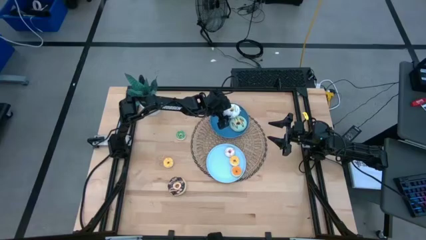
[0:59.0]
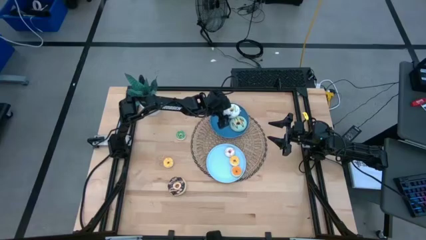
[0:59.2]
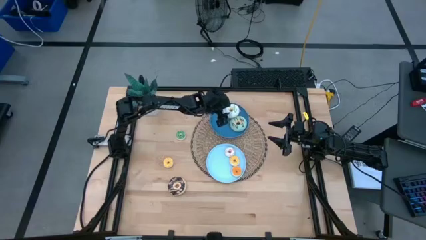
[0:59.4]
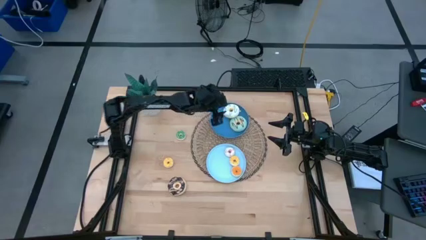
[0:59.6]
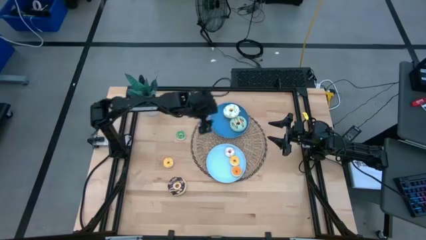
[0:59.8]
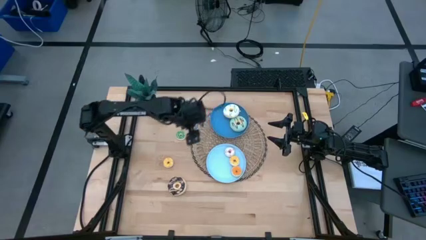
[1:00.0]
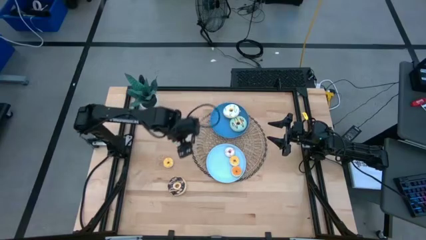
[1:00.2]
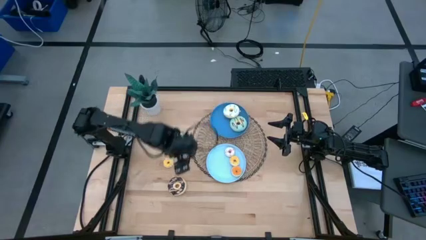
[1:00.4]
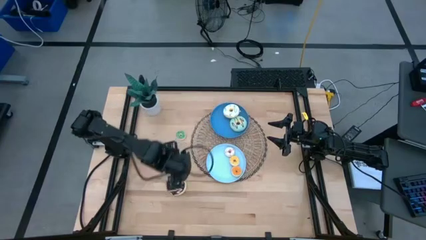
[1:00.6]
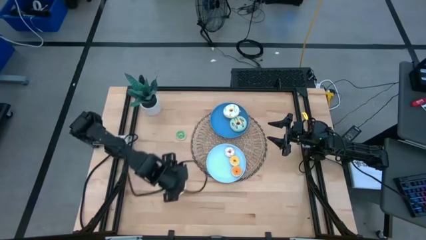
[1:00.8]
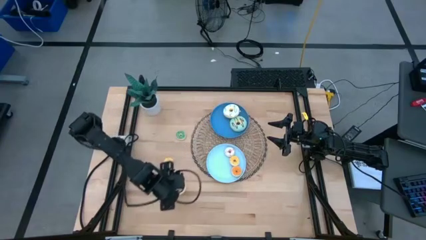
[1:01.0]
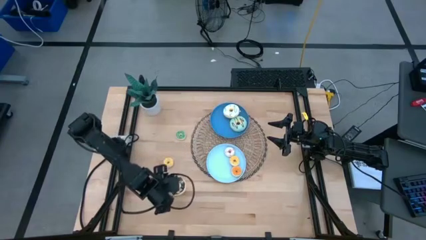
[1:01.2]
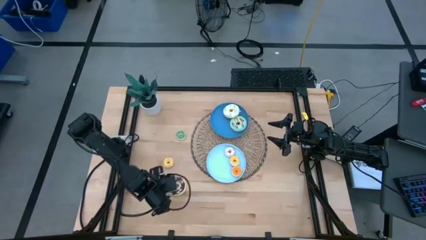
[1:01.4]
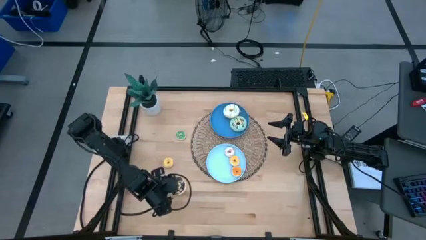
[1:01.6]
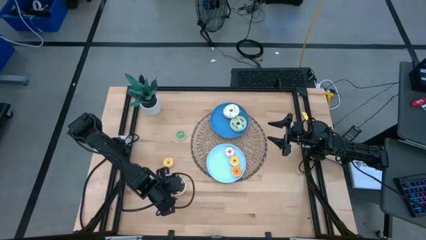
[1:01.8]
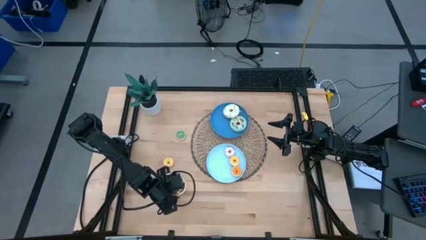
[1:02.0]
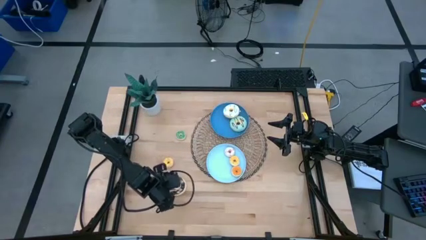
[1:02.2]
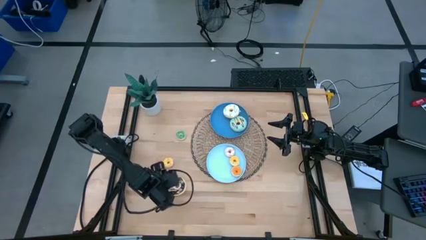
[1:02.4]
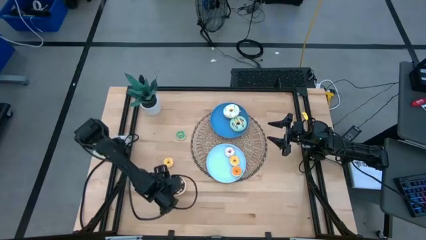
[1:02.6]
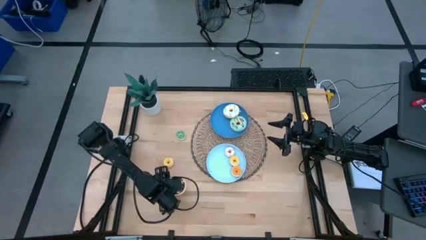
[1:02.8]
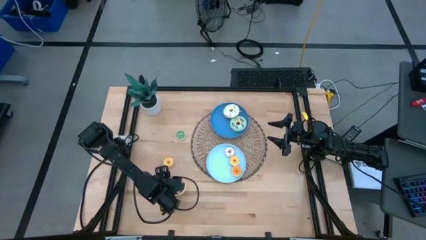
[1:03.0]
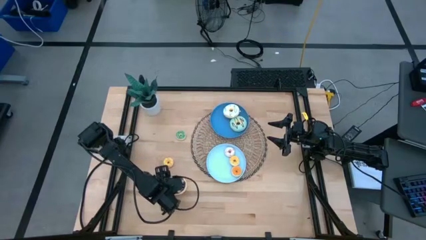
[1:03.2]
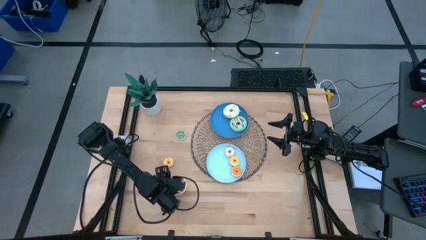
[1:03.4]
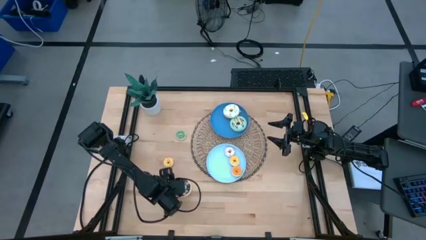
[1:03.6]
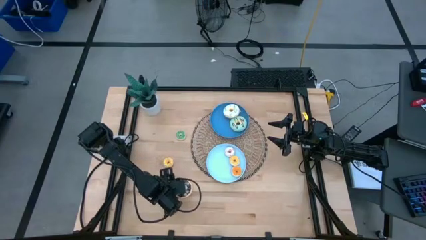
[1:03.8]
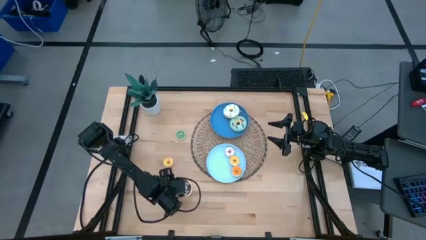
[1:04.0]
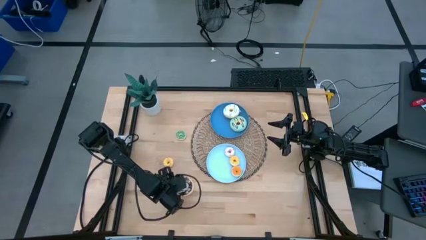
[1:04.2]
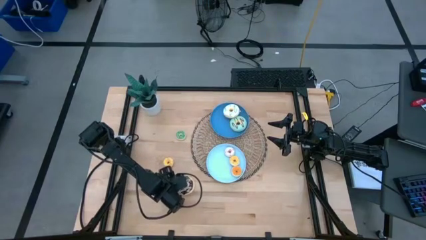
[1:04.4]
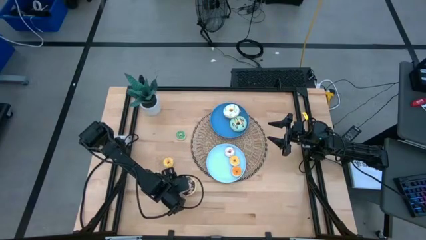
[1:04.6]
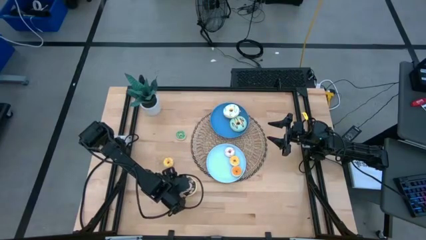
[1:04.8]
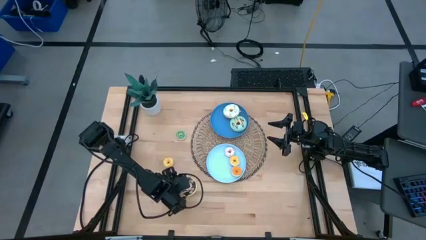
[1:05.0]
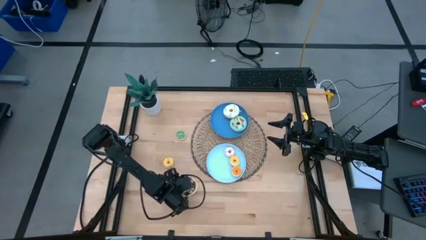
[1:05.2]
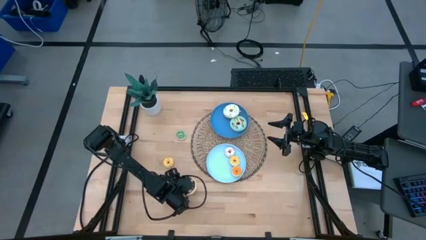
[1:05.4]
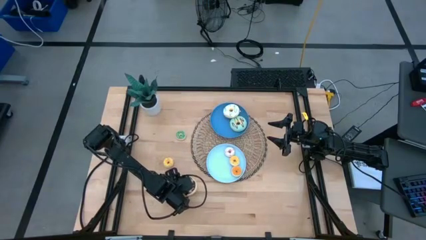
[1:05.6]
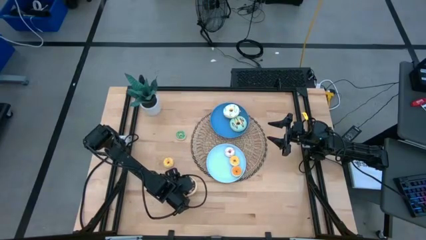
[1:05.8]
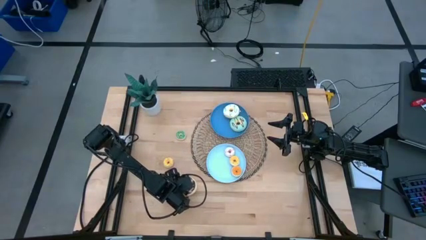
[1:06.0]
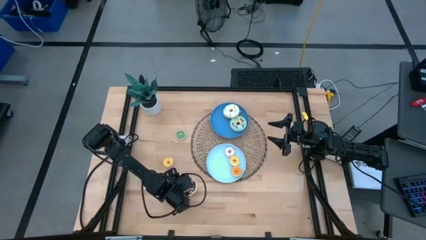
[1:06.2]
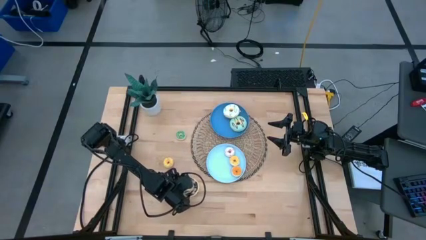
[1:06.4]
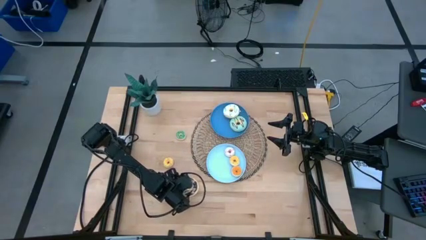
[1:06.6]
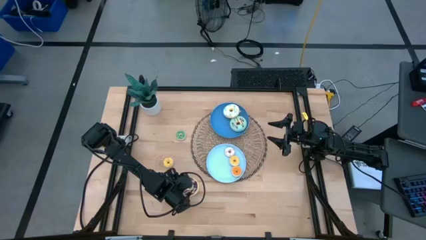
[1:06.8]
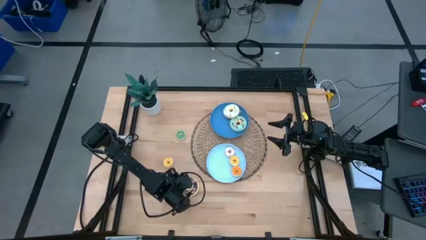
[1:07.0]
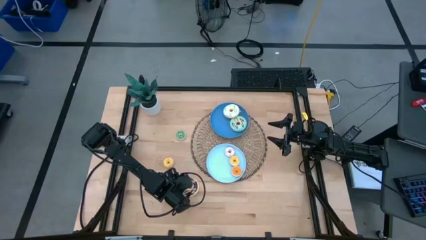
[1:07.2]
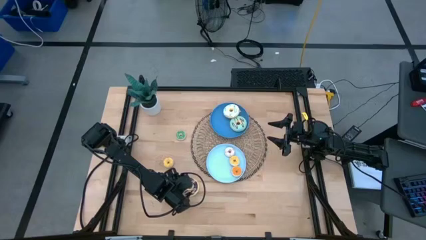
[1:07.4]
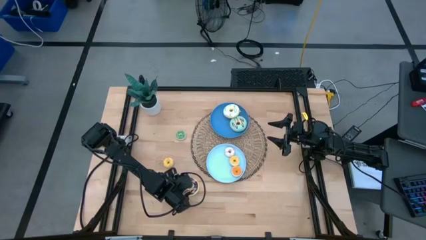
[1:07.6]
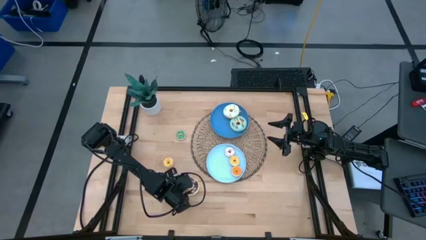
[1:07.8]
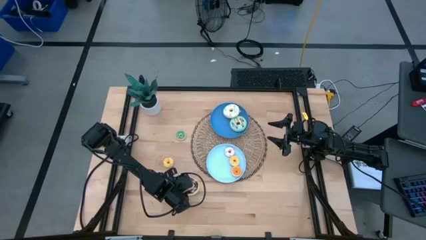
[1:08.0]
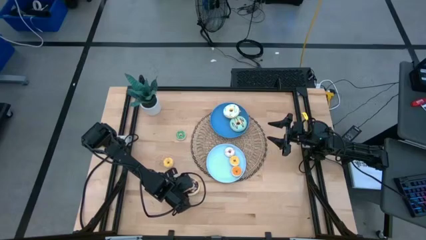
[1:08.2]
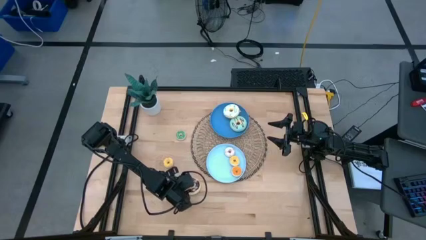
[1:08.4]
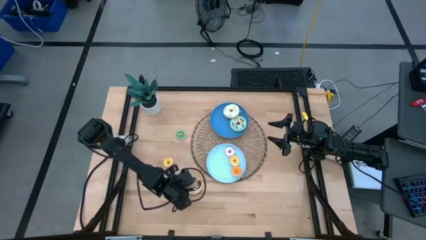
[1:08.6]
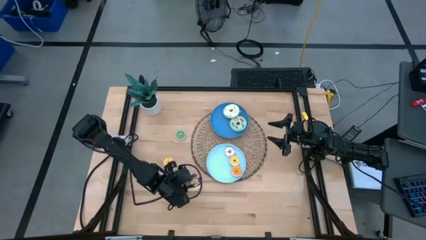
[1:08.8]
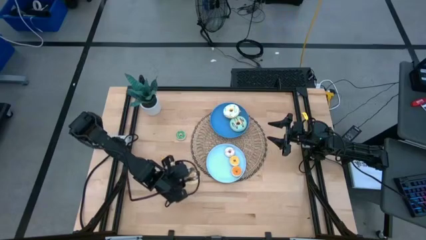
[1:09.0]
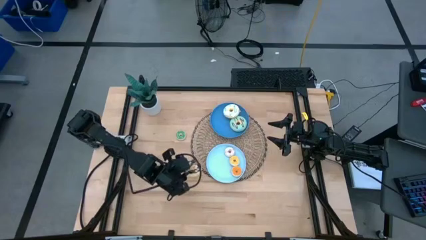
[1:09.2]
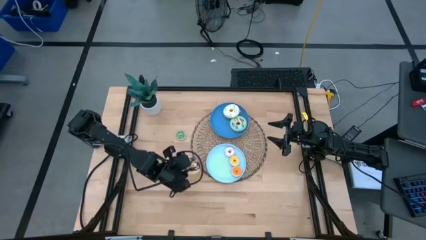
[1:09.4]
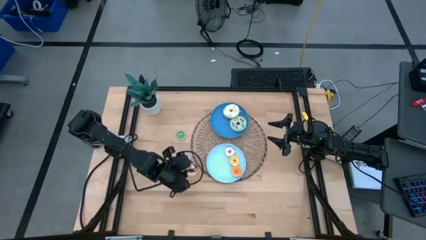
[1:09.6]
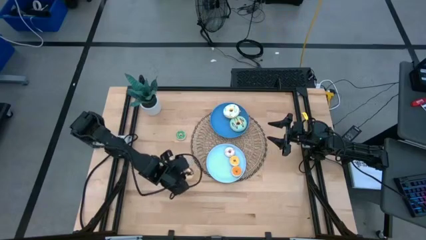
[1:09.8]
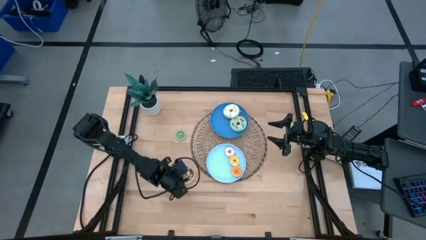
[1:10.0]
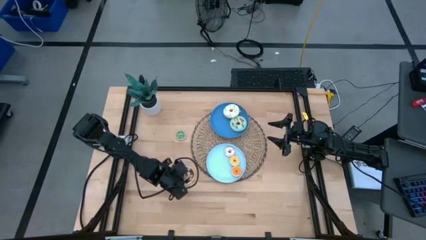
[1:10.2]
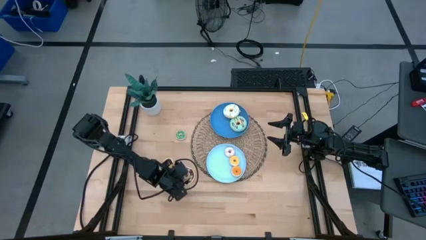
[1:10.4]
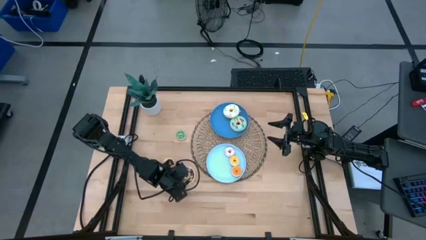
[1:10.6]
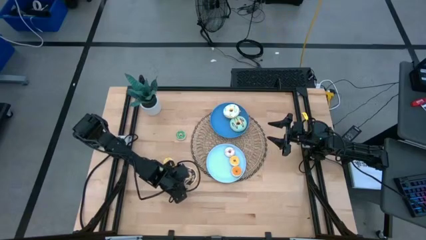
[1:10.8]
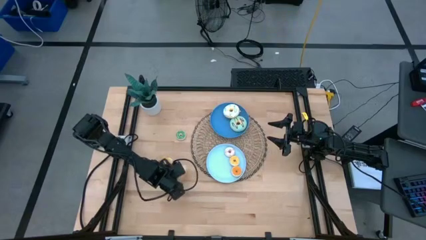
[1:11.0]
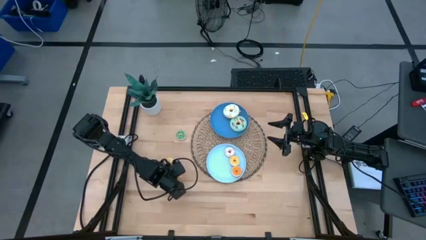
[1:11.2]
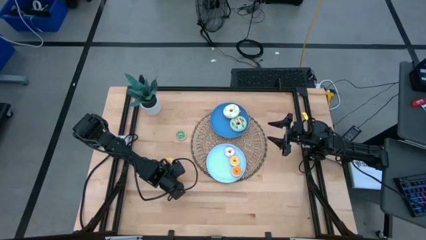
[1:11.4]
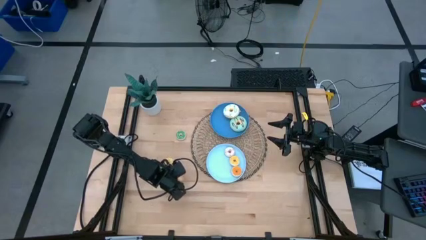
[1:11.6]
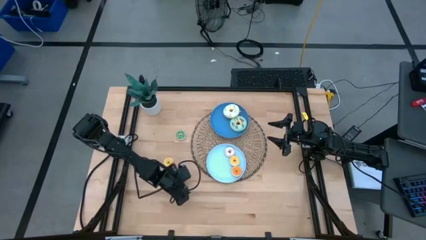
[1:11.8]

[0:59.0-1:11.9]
Task: Pick & Place donuts
Put the black donut on the blue plate
